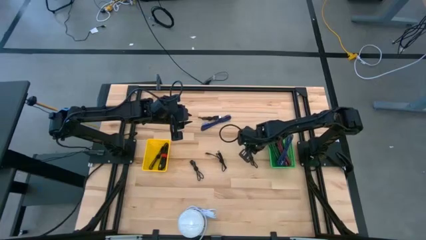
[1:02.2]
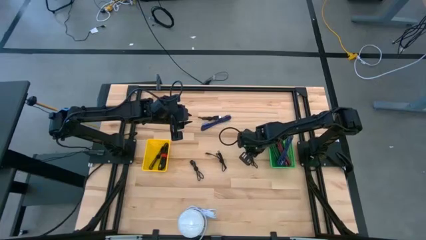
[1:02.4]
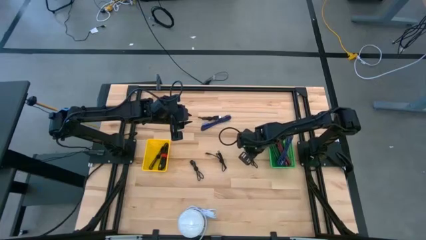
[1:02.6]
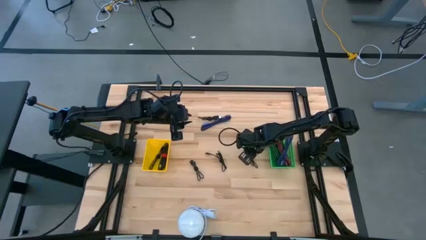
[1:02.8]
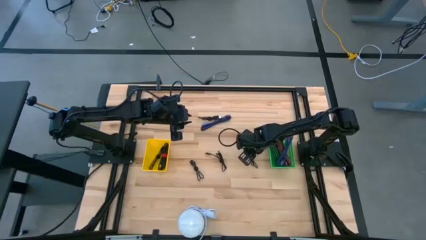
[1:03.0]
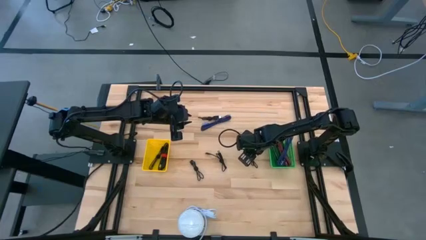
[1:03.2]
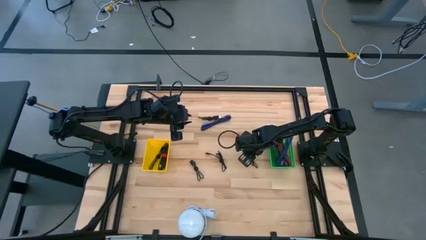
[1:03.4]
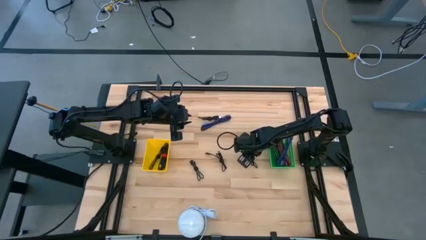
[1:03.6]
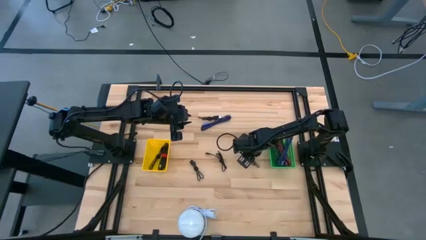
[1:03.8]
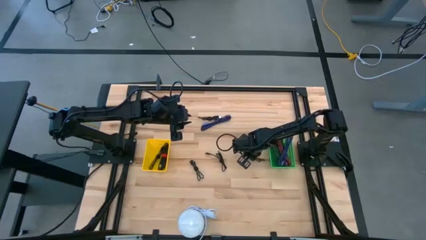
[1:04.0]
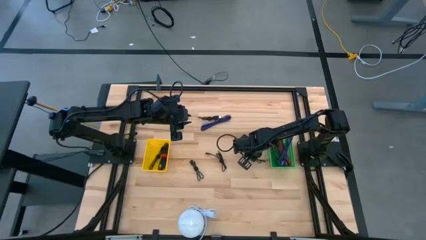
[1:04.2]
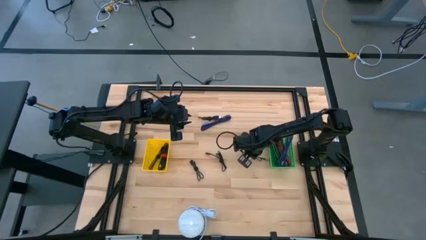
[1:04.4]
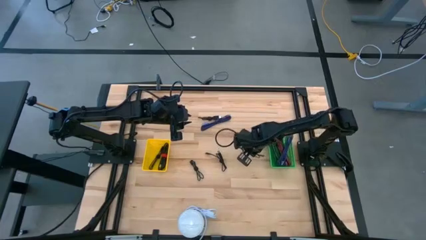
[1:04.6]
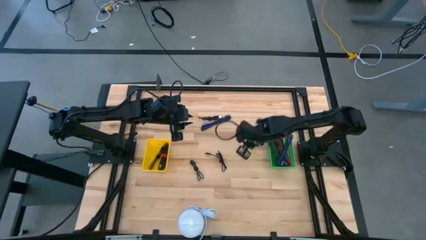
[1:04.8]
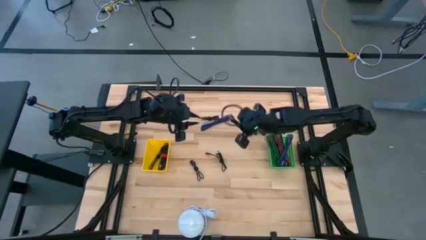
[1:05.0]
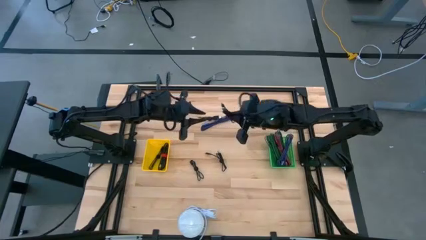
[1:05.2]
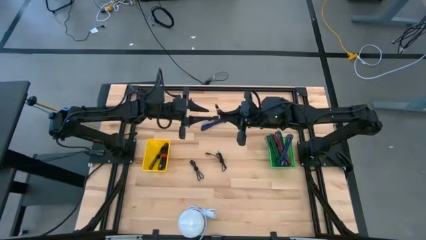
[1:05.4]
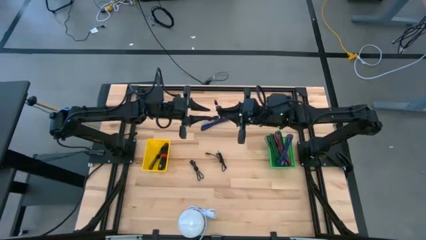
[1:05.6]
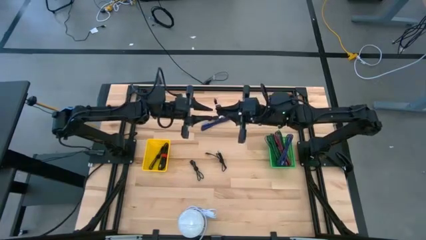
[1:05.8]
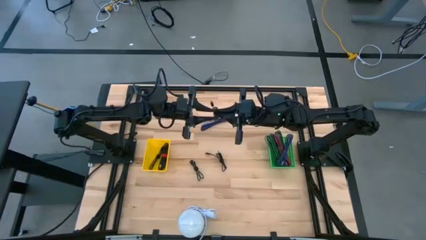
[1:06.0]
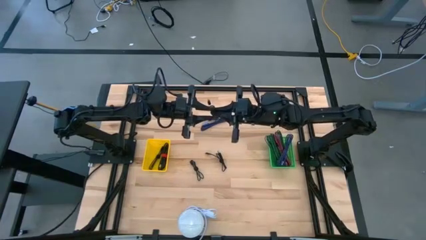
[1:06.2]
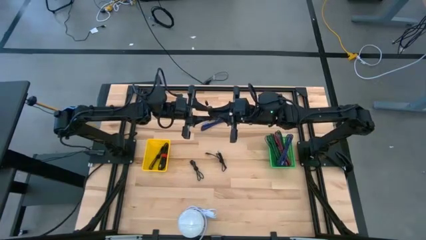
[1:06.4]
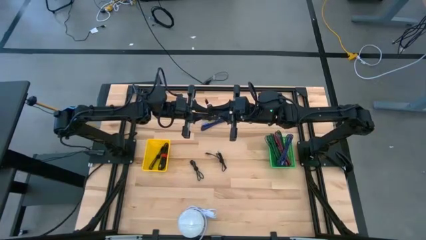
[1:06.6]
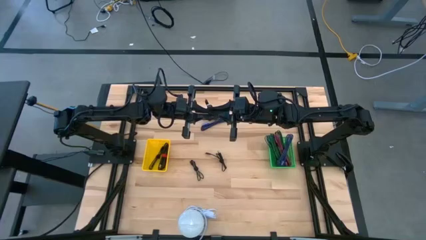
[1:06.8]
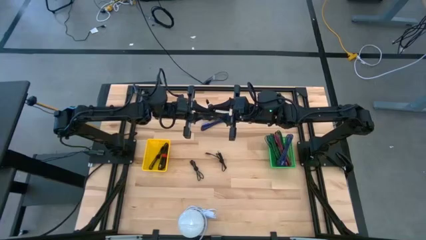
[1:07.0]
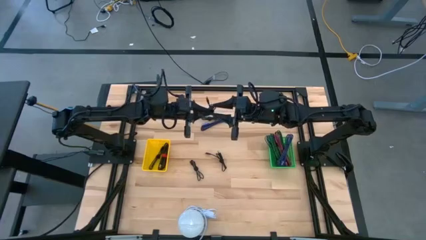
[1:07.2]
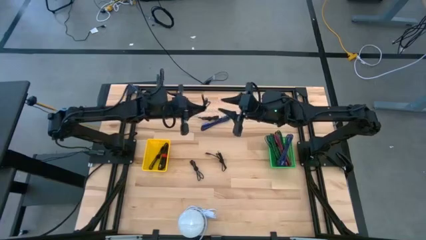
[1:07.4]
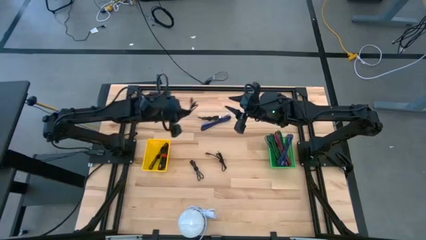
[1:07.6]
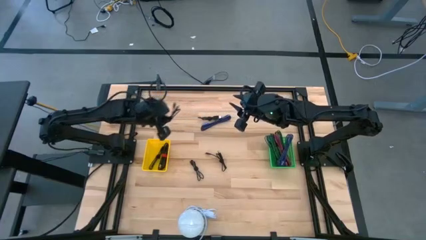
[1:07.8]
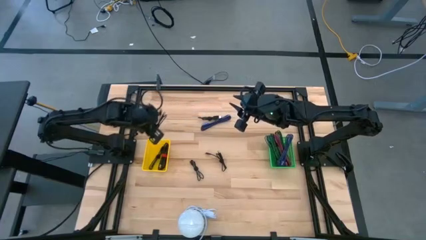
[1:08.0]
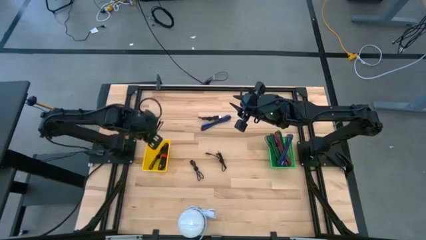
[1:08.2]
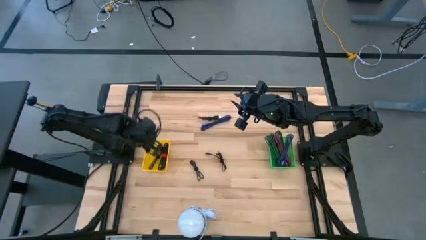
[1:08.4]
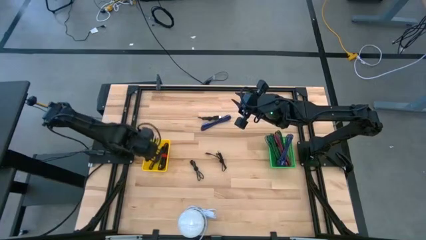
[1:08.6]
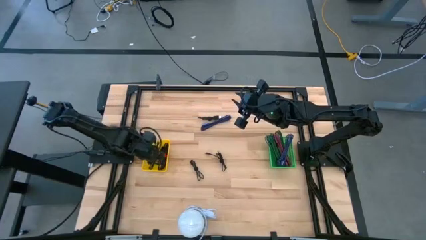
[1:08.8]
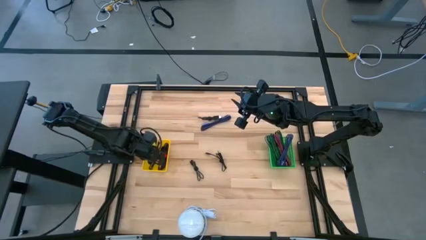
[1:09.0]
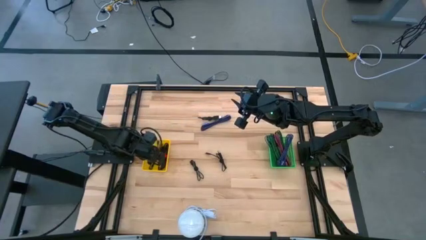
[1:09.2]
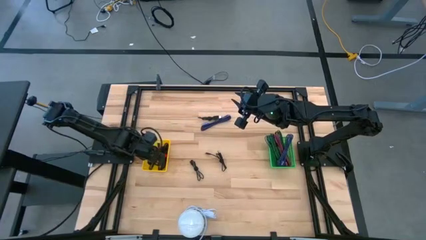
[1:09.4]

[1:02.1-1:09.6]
Task: Pick & Place USB Port
Put the black charger cable into the yellow basket

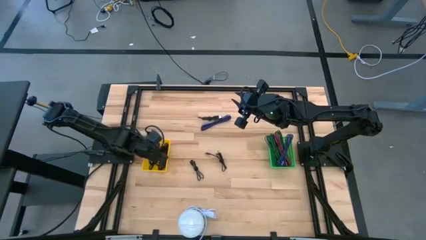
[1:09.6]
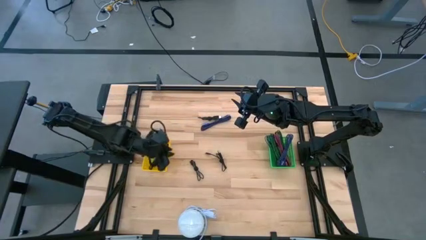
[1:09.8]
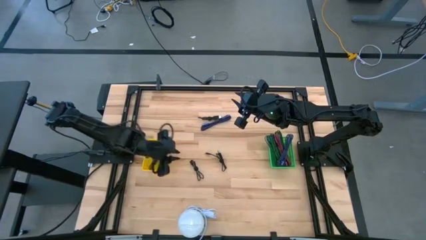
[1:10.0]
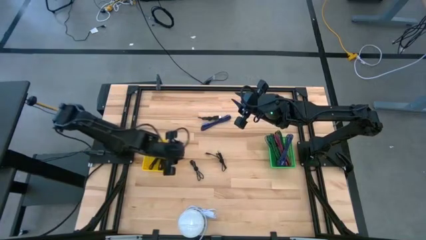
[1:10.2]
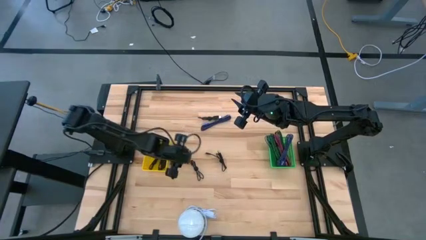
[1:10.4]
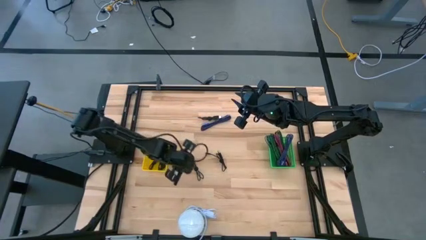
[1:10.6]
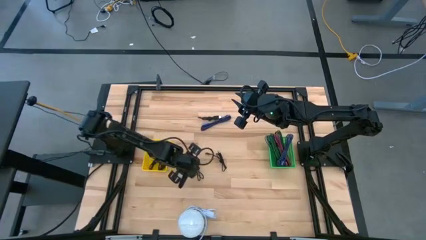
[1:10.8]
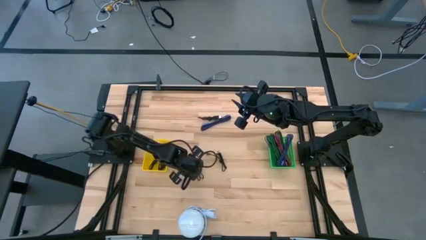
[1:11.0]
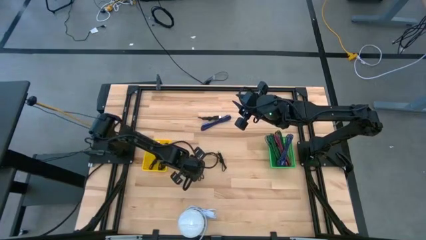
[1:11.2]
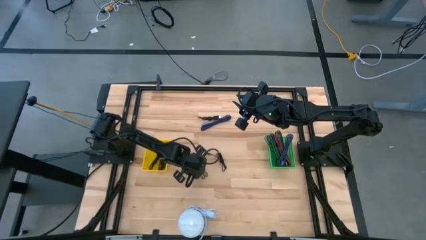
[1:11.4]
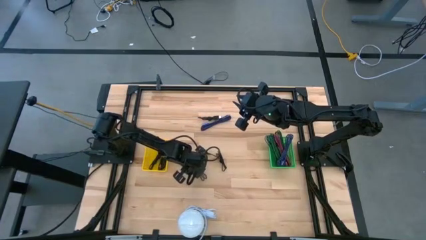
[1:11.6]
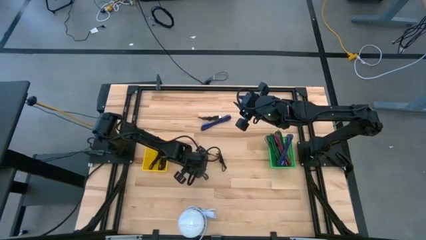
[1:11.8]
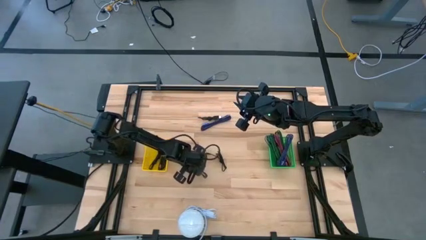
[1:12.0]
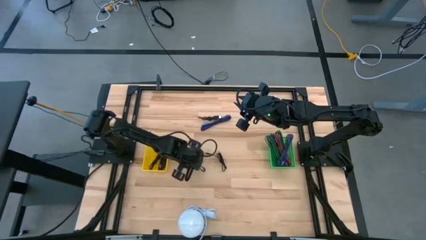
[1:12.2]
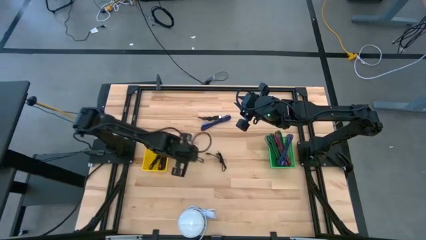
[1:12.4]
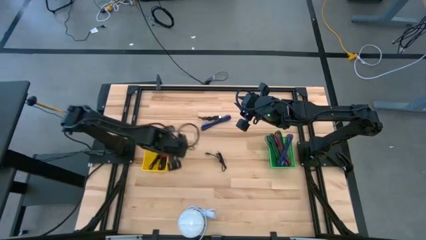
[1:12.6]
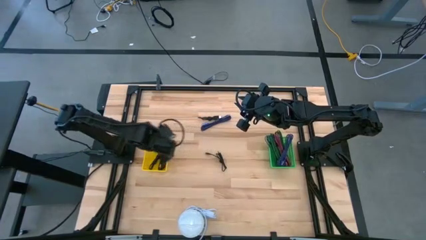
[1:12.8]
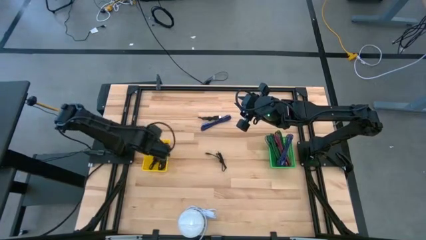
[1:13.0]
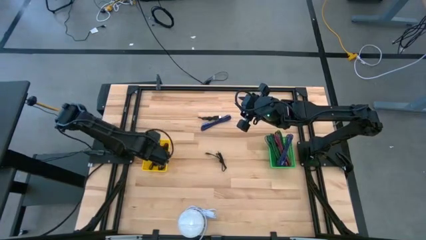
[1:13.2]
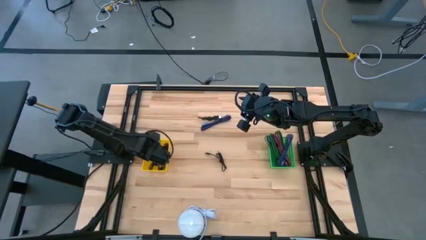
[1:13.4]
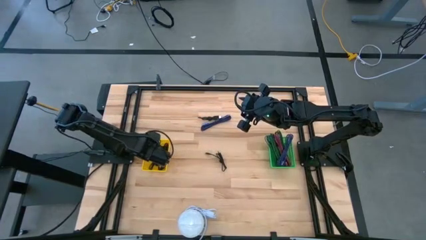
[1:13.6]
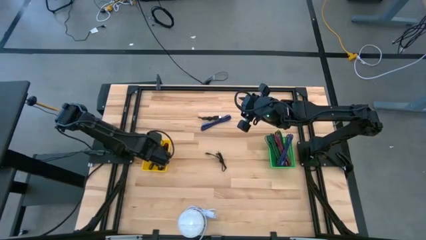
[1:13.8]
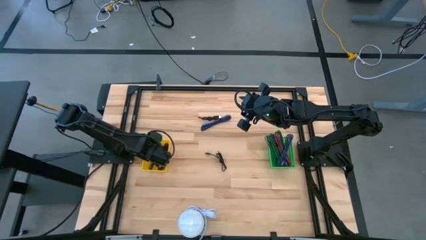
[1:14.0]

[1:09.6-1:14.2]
Put the black charger cable into the yellow basket

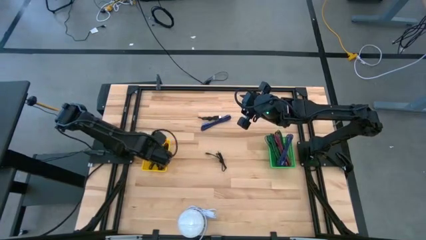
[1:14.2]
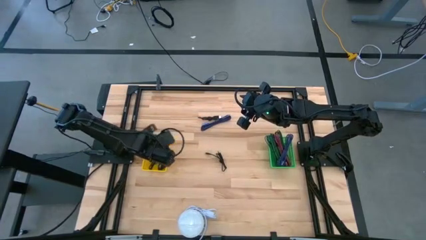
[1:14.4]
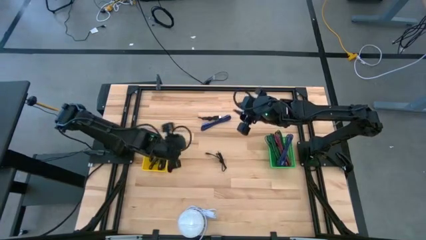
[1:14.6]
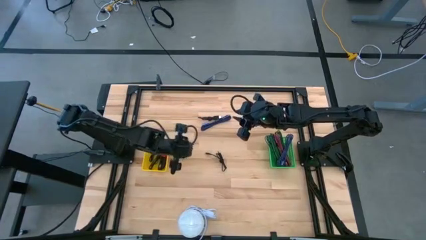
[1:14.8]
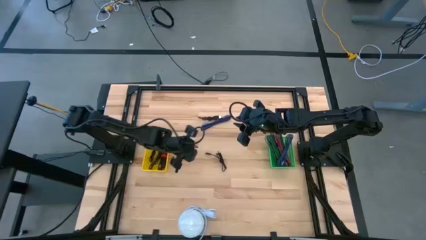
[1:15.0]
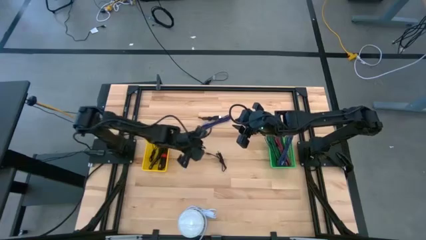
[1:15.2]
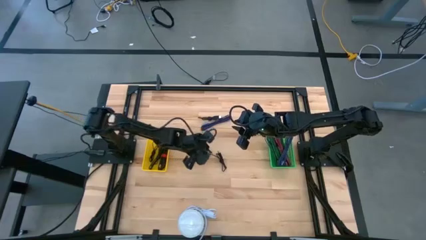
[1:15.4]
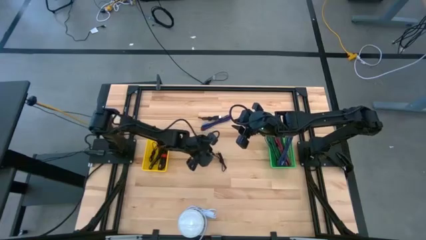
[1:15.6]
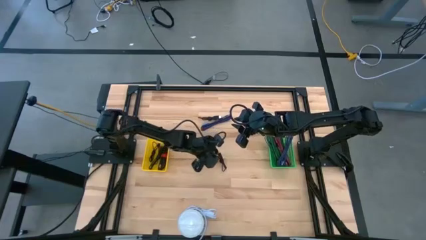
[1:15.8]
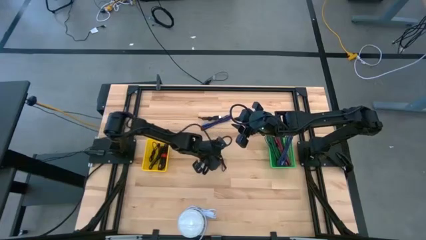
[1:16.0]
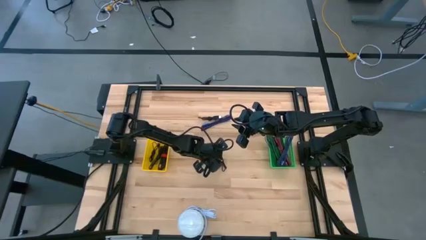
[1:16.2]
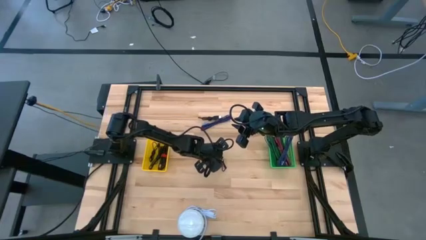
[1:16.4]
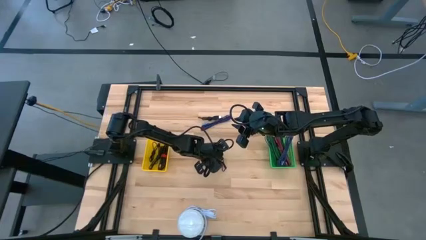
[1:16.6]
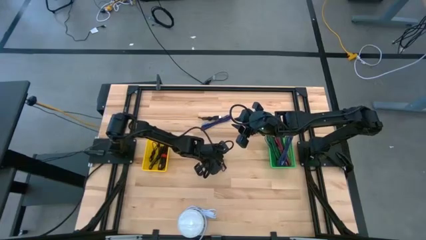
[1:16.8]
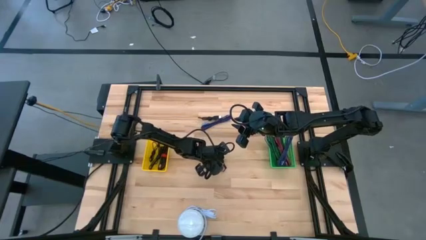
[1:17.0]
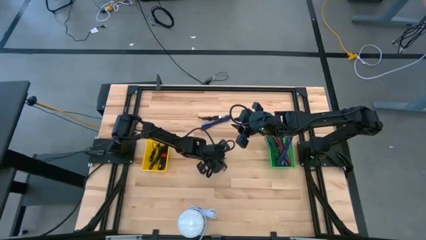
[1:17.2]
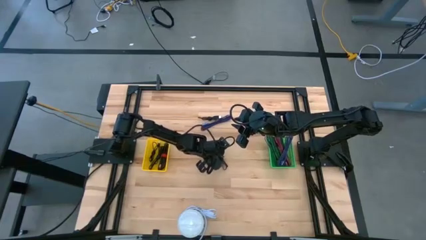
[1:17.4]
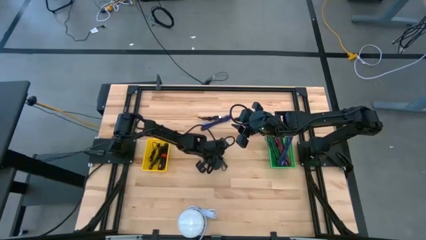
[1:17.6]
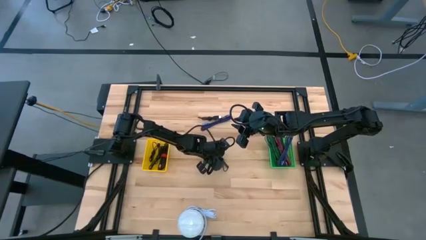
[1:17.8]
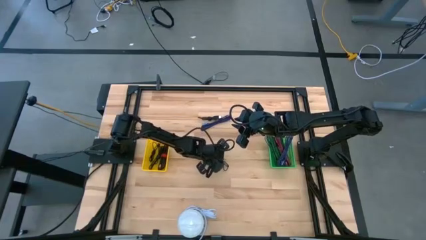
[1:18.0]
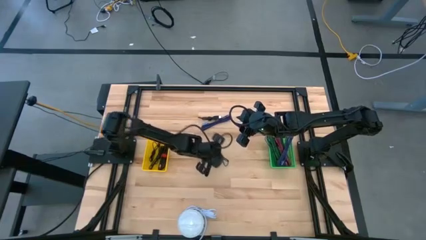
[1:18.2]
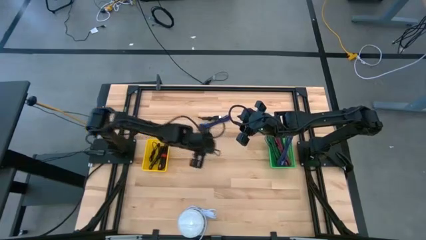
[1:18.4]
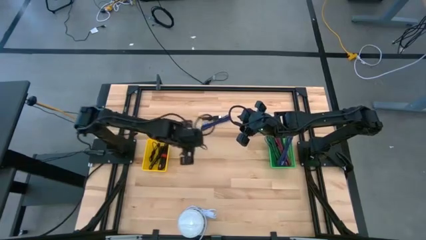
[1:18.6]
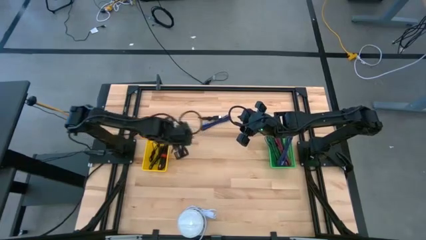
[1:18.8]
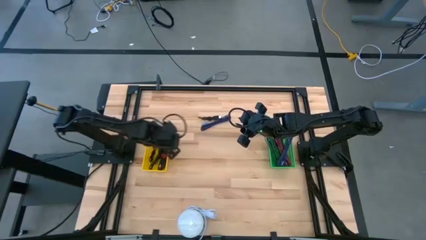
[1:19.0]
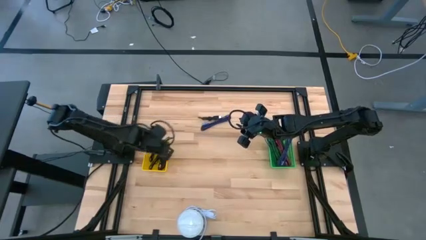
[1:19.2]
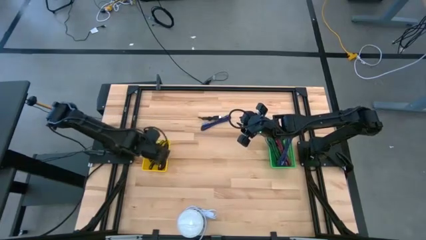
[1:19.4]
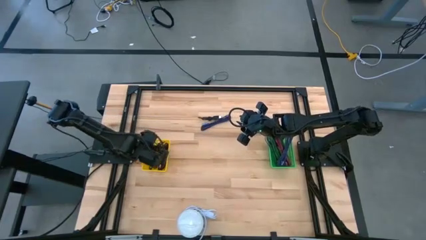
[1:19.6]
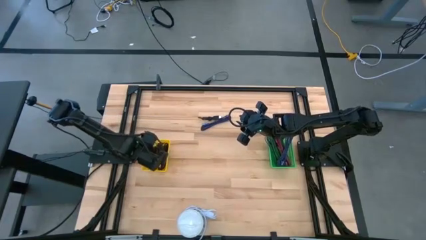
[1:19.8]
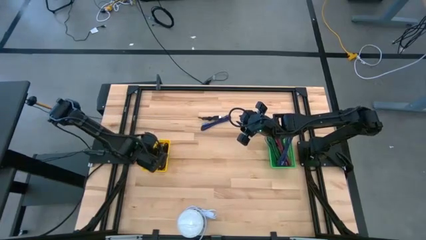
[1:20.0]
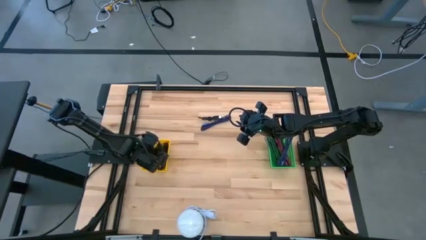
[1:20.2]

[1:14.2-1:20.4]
Put the black charger cable into the yellow basket
